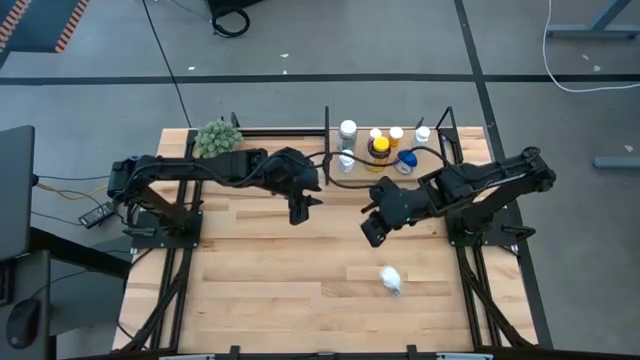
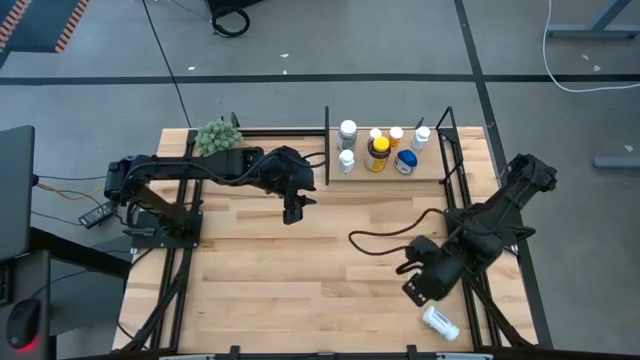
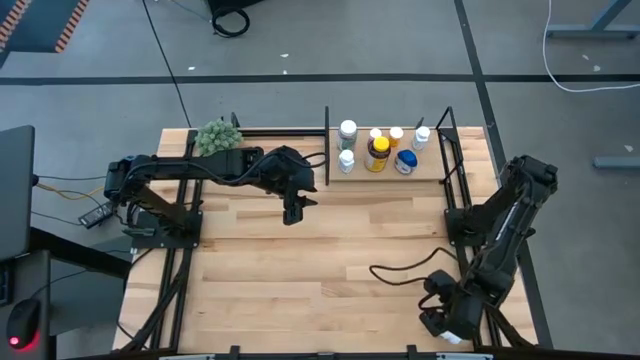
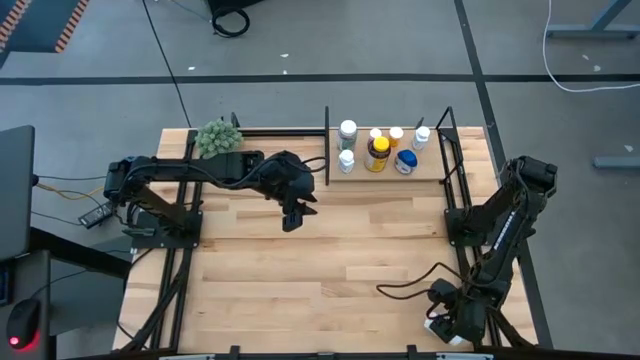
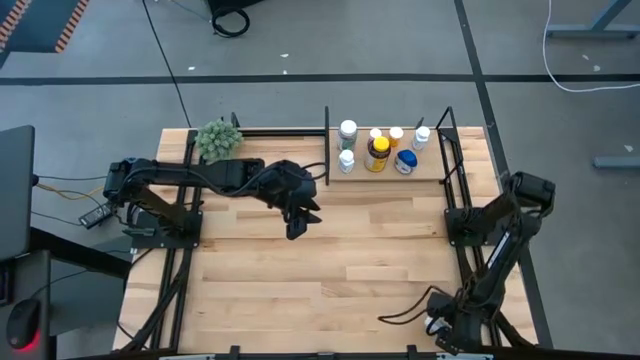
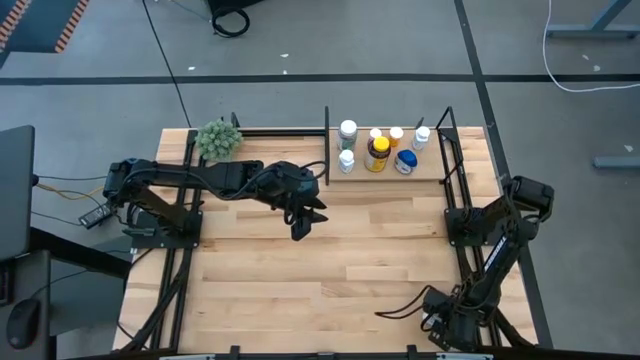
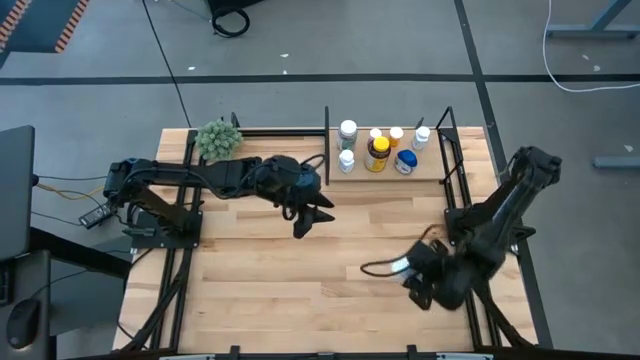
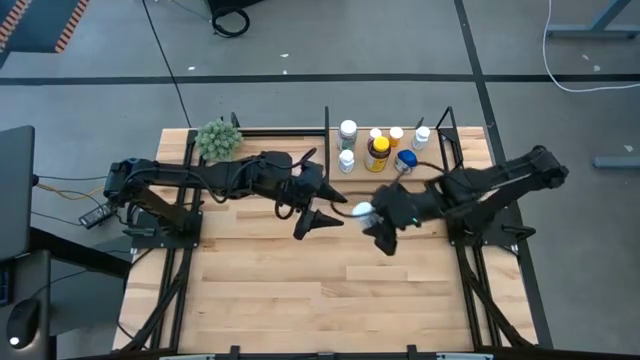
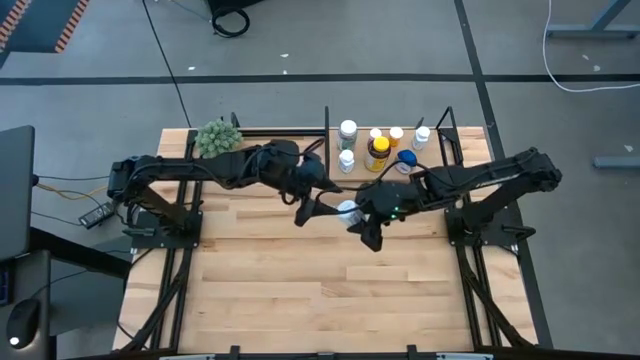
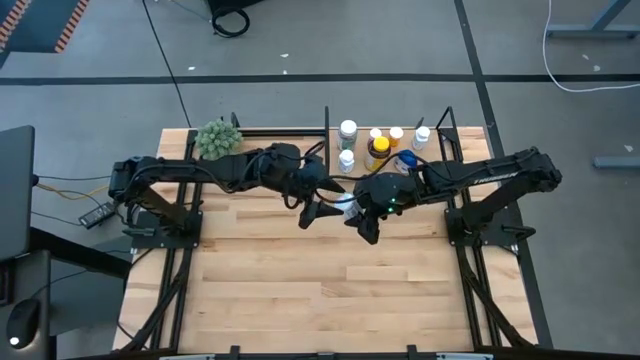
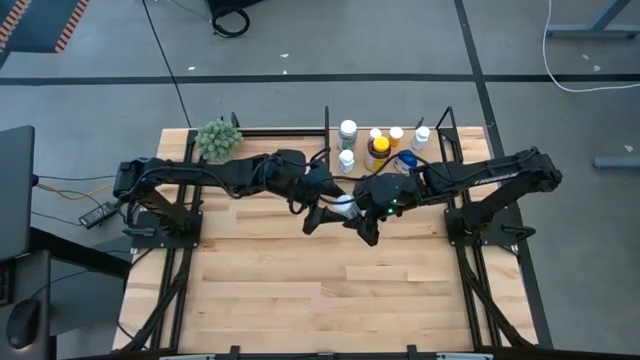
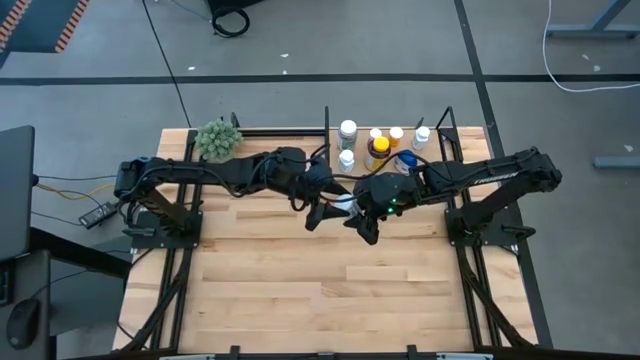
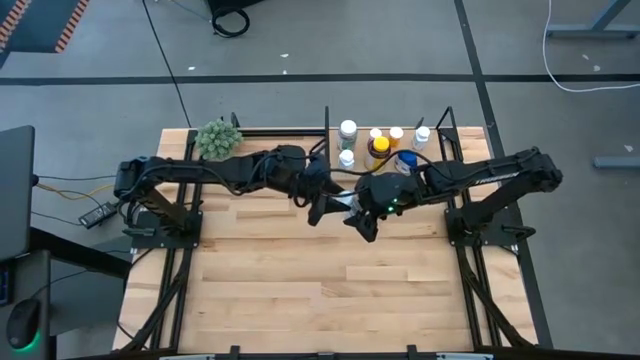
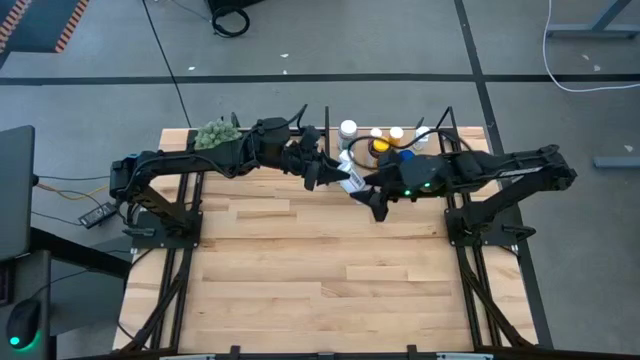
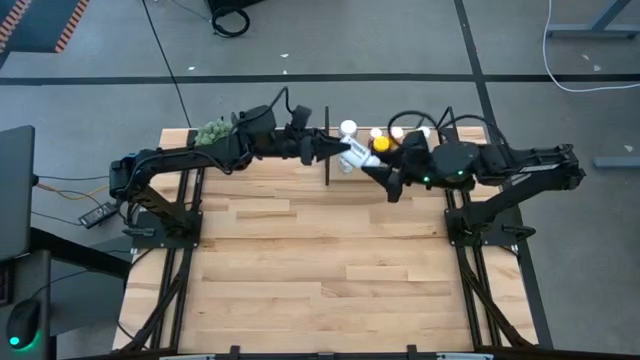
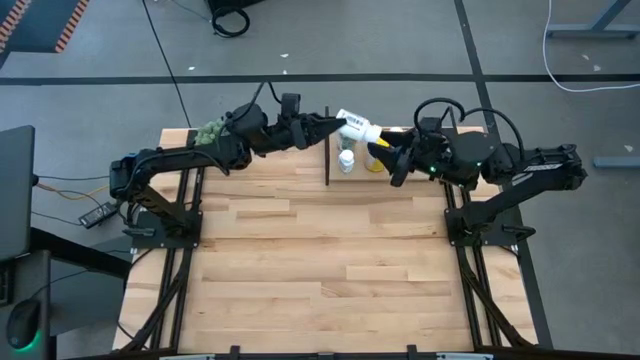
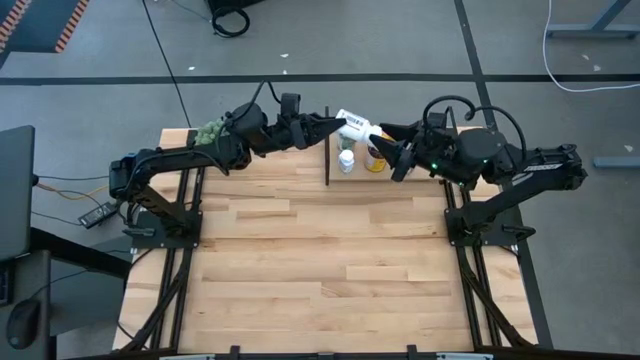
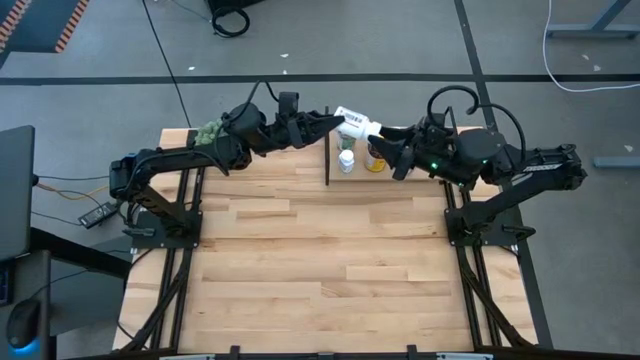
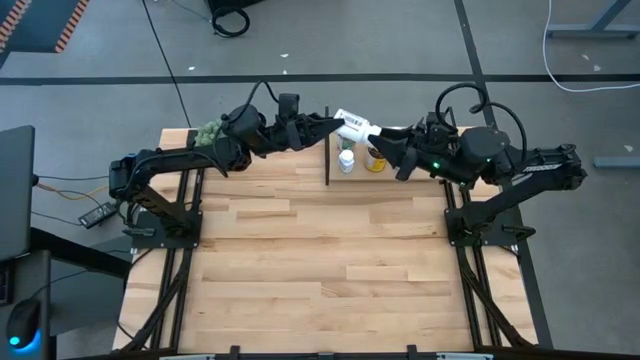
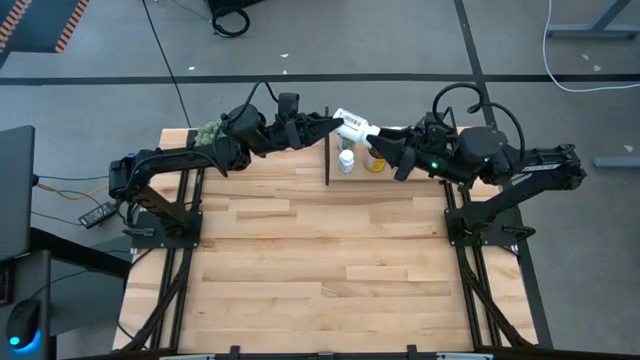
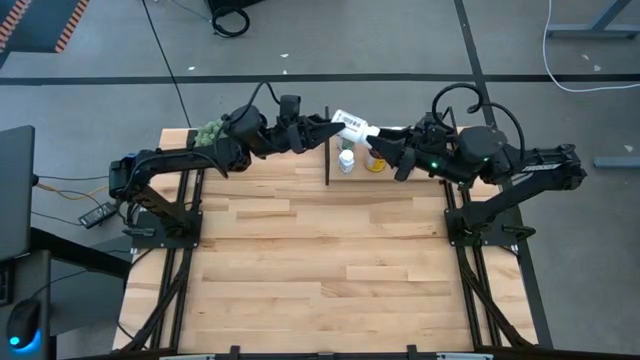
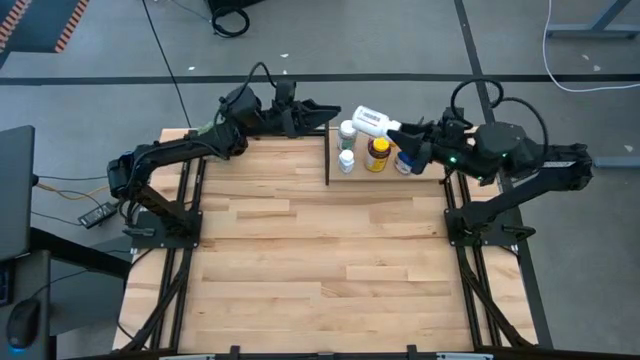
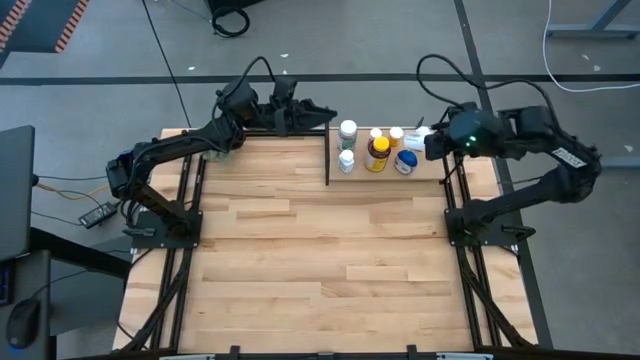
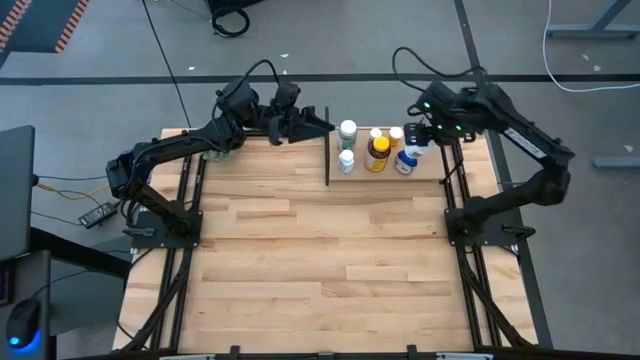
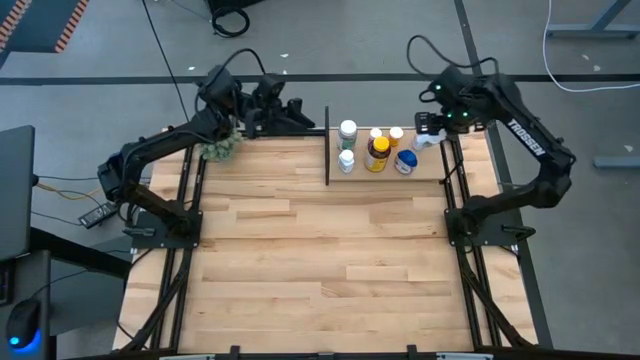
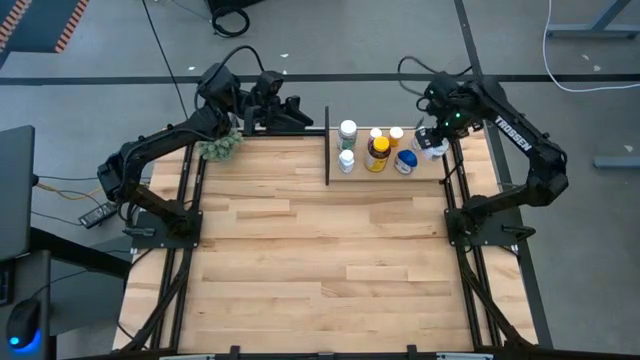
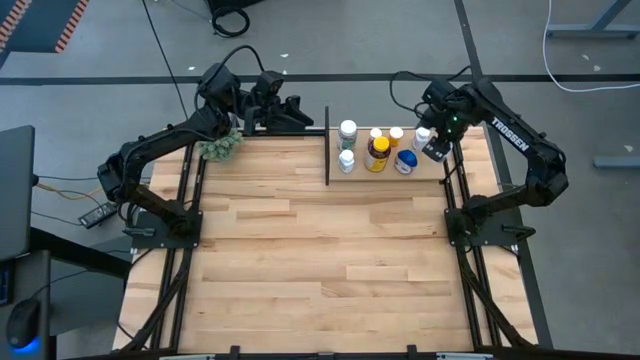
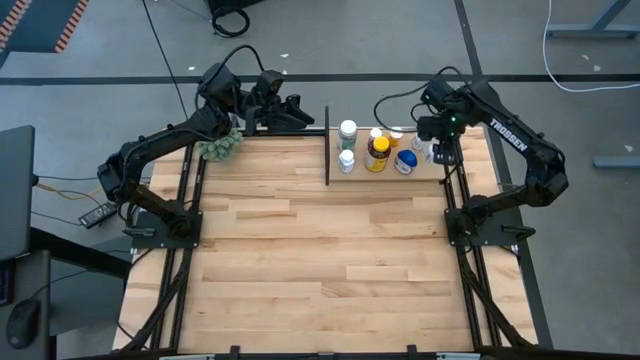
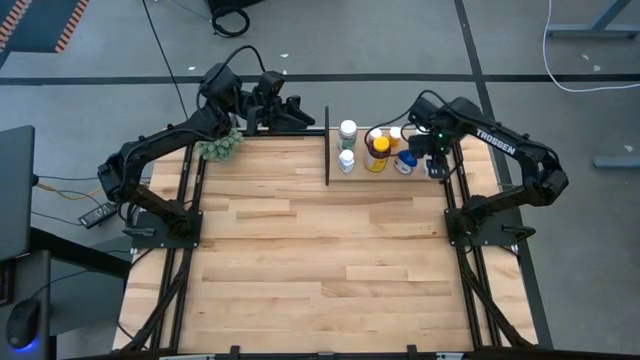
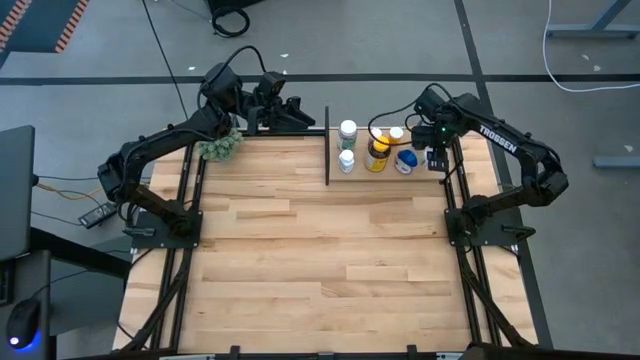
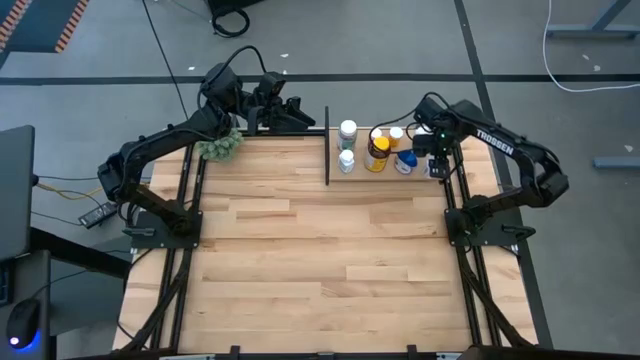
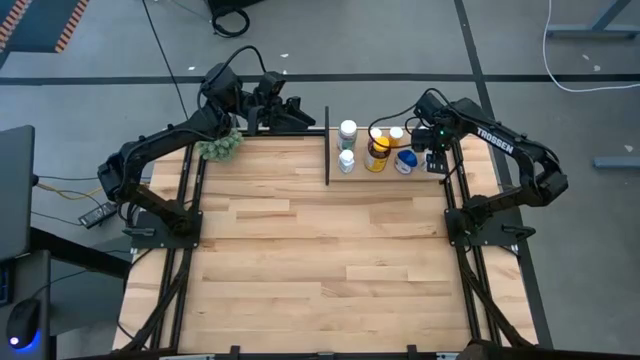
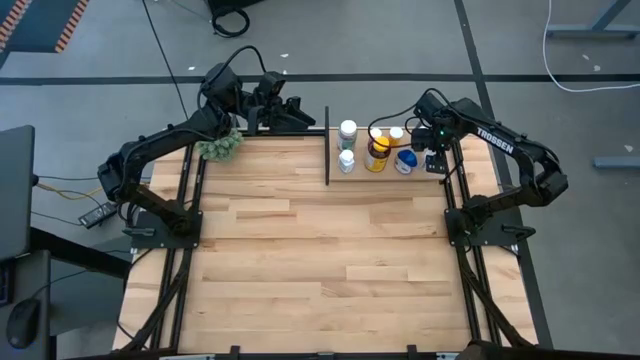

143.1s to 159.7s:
Task: Pick and place medicine bottles onto shelf by color
Put the white pill bottle on the shelf

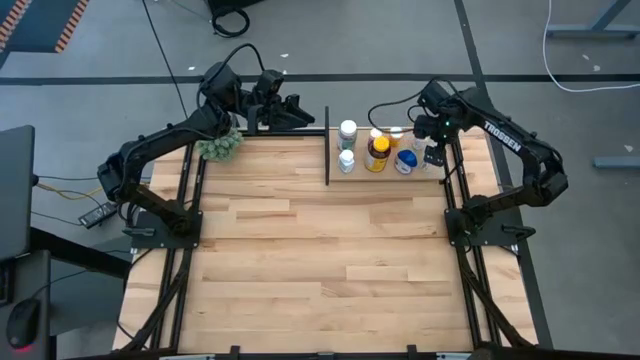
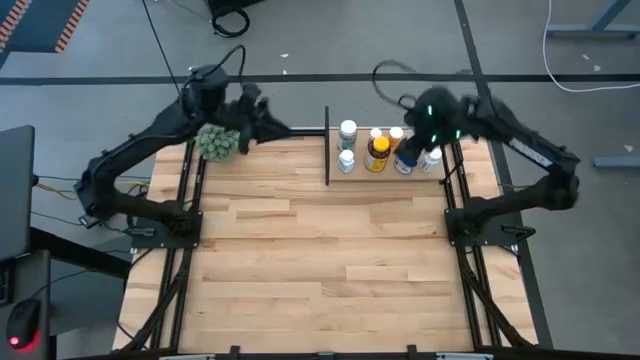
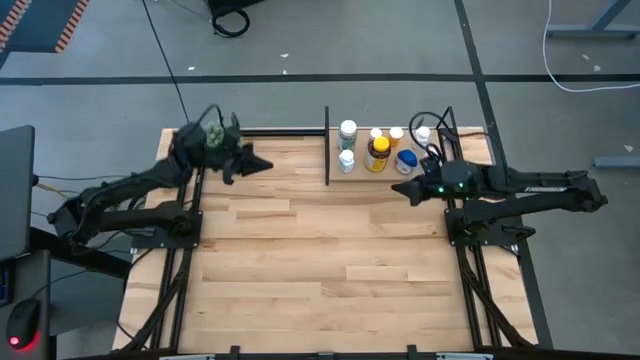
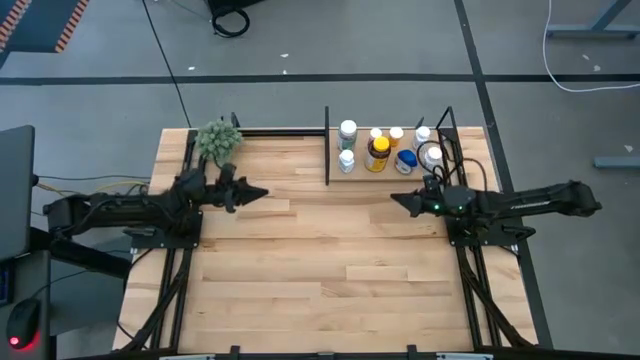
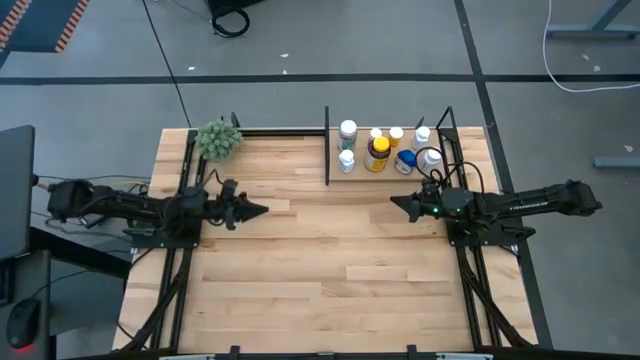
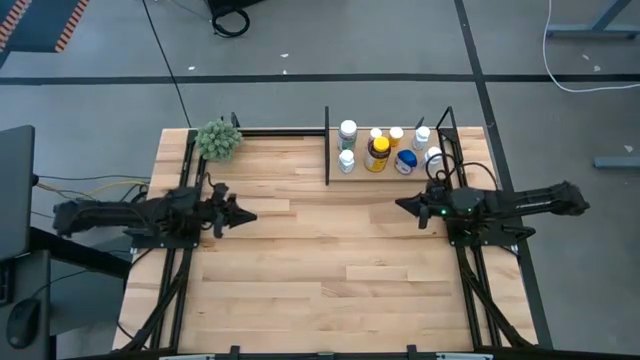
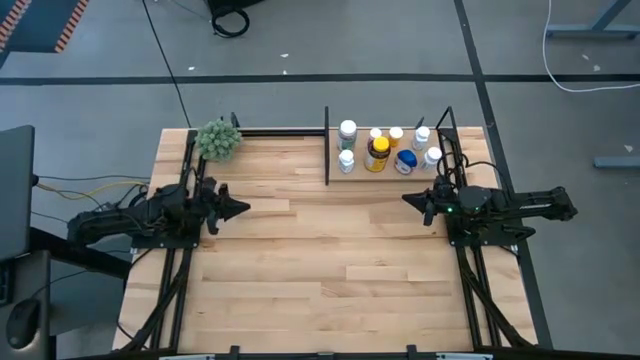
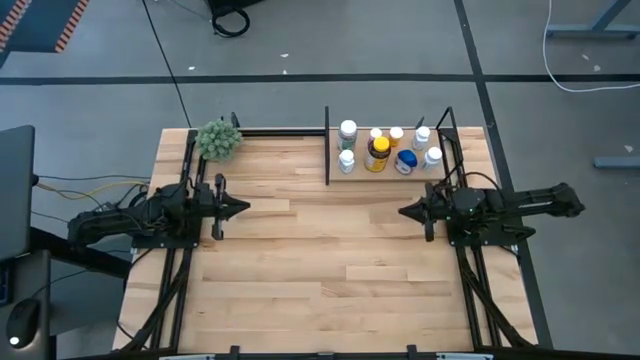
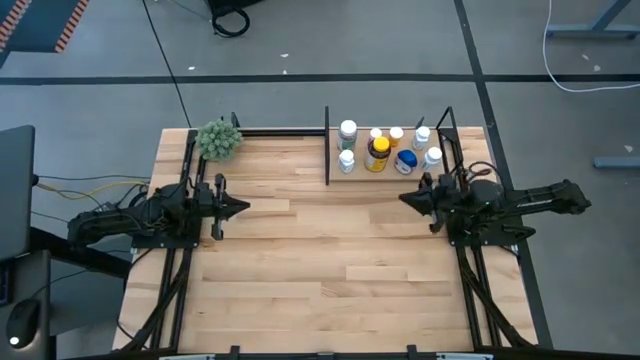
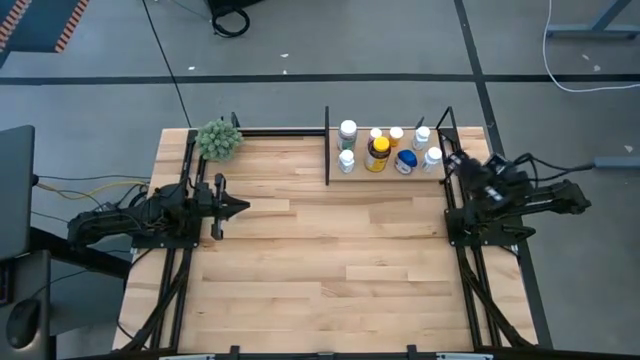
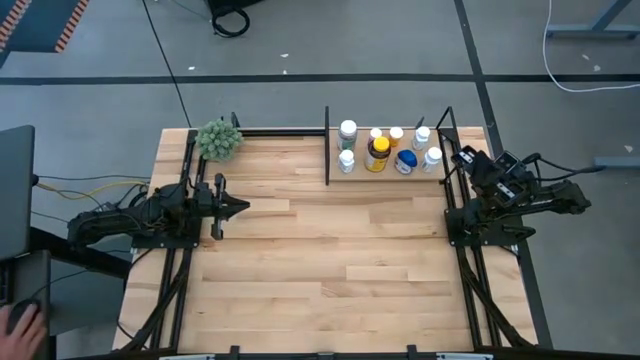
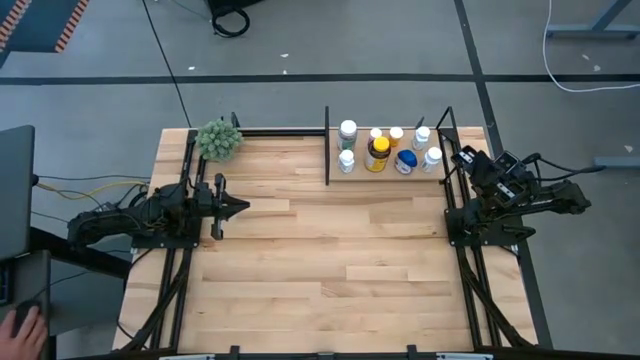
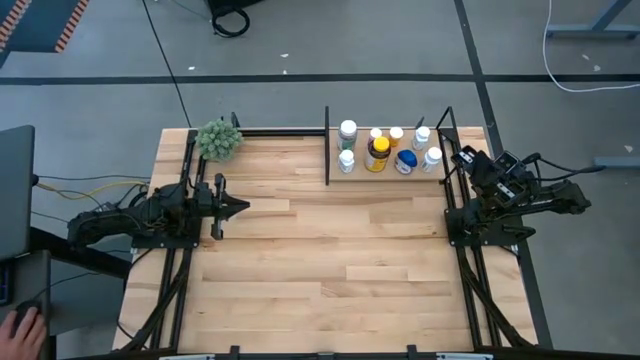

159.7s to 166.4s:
Return to Home Position
